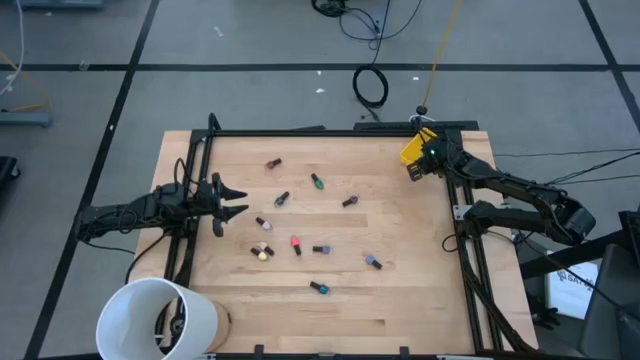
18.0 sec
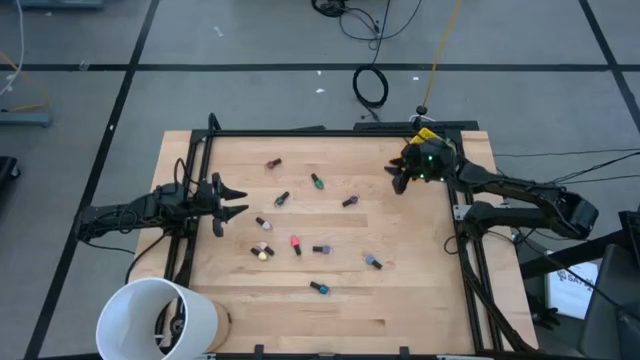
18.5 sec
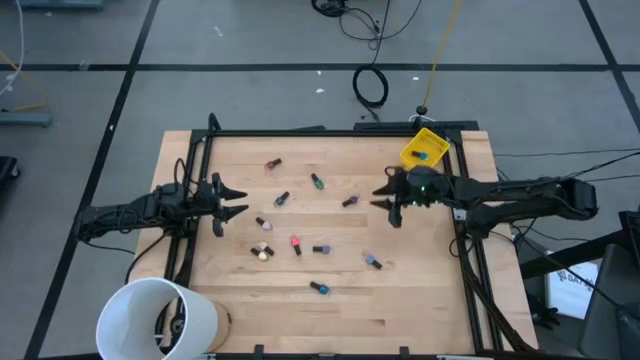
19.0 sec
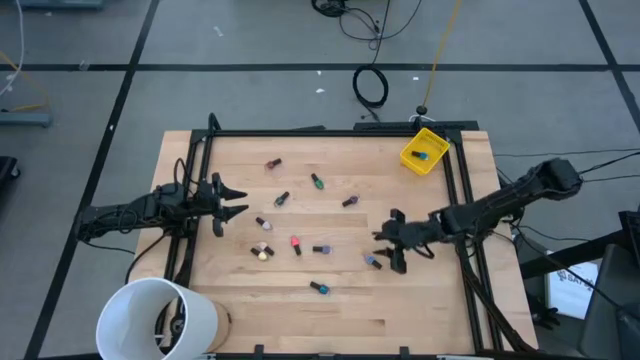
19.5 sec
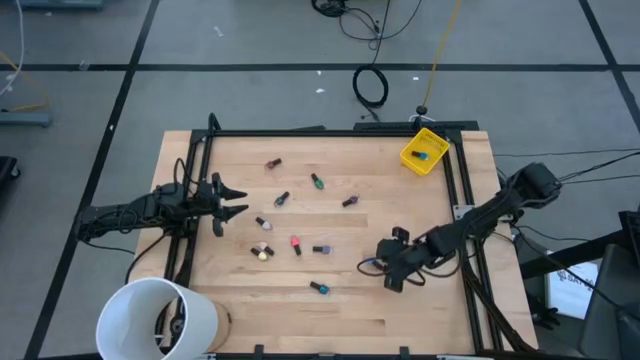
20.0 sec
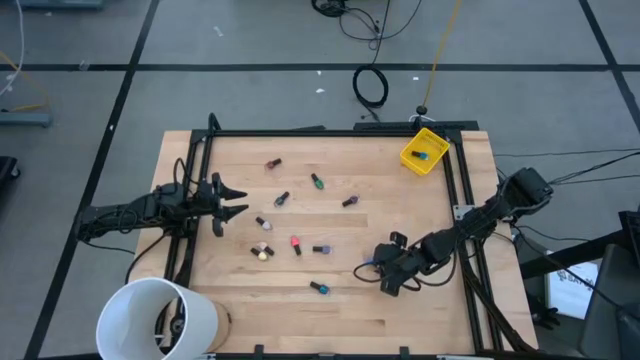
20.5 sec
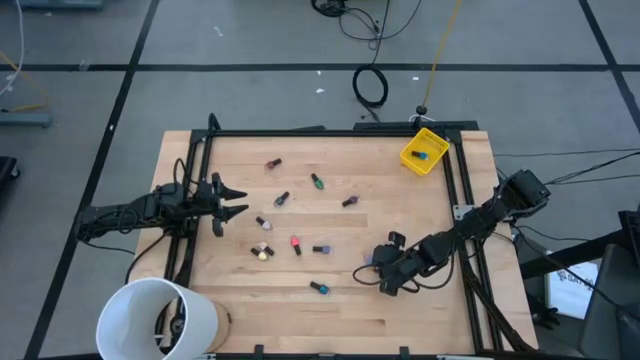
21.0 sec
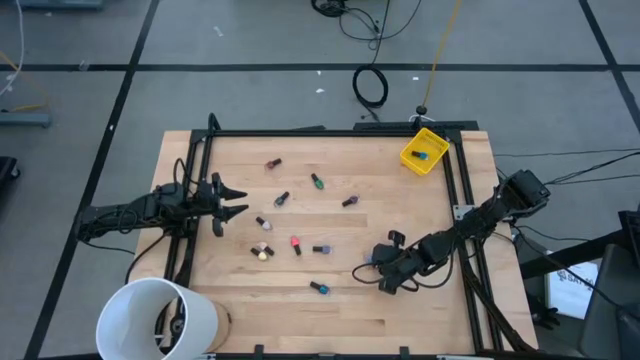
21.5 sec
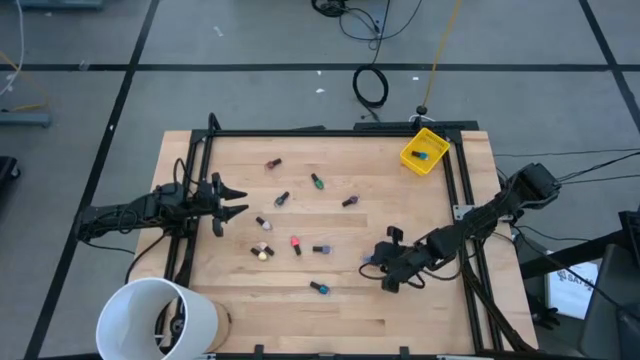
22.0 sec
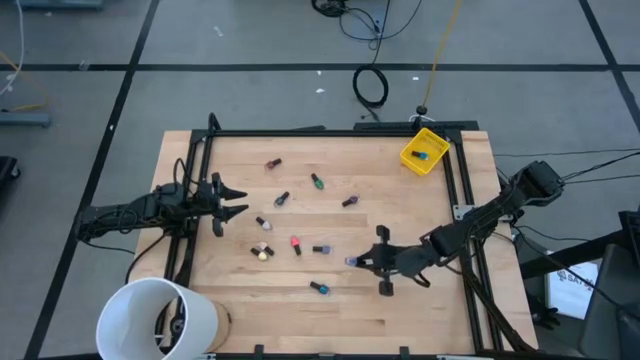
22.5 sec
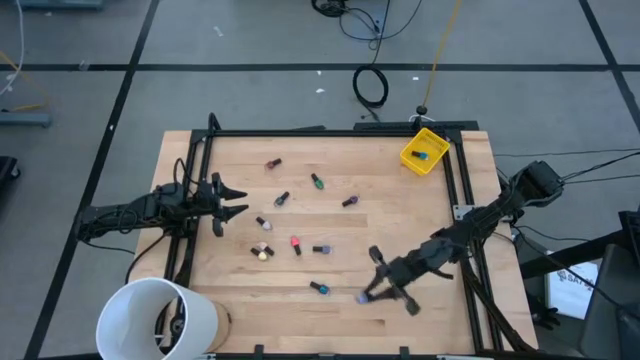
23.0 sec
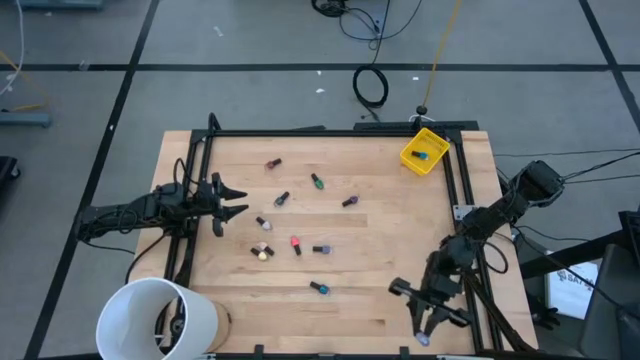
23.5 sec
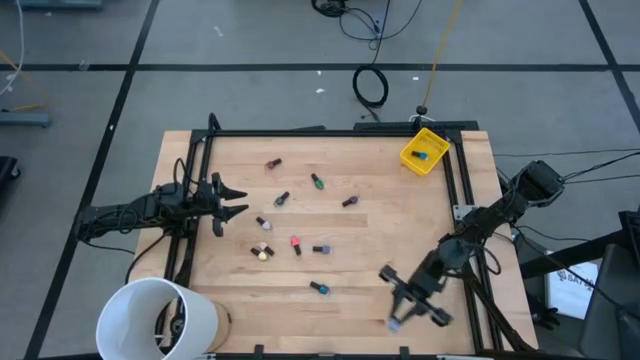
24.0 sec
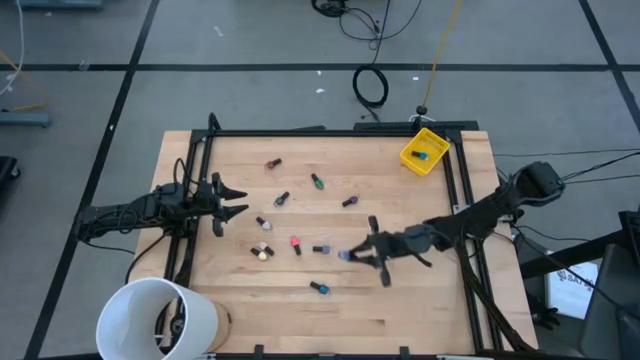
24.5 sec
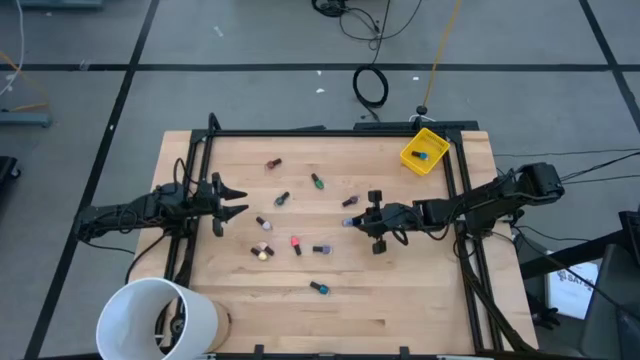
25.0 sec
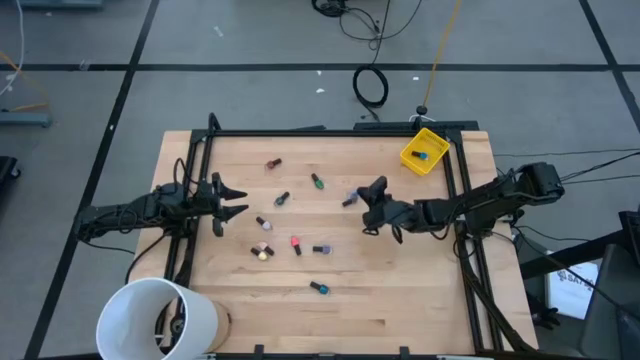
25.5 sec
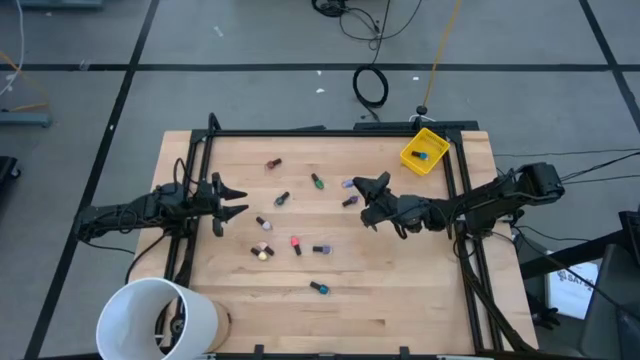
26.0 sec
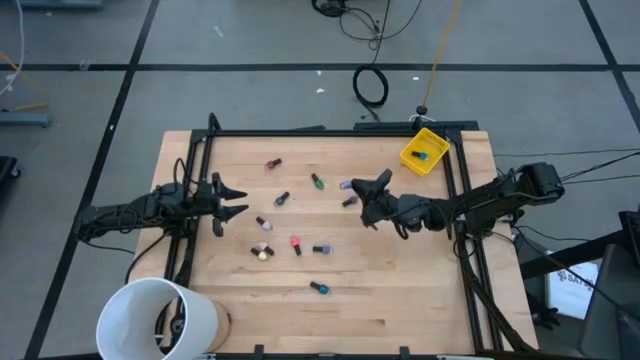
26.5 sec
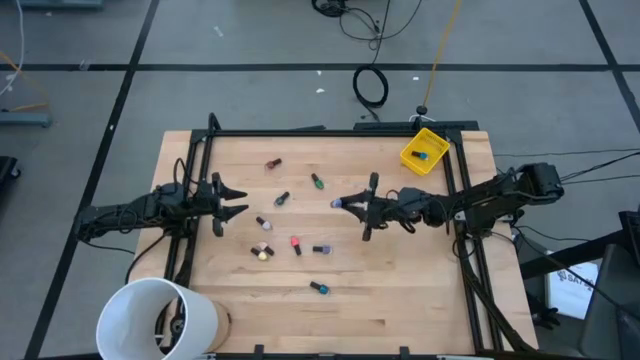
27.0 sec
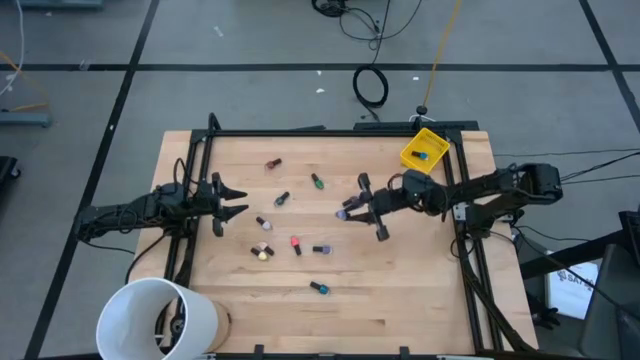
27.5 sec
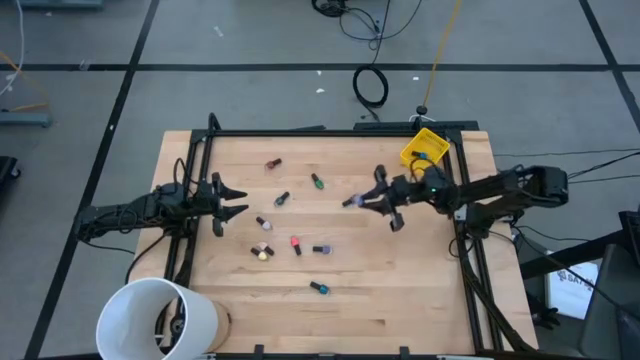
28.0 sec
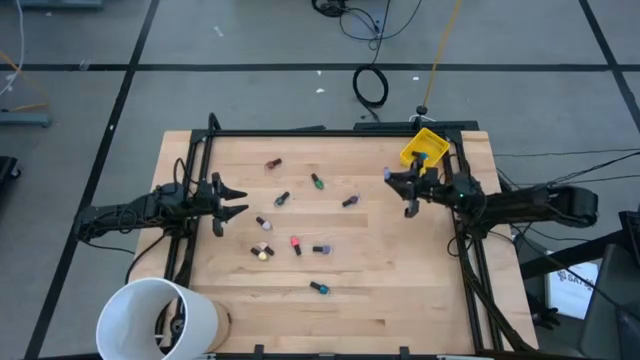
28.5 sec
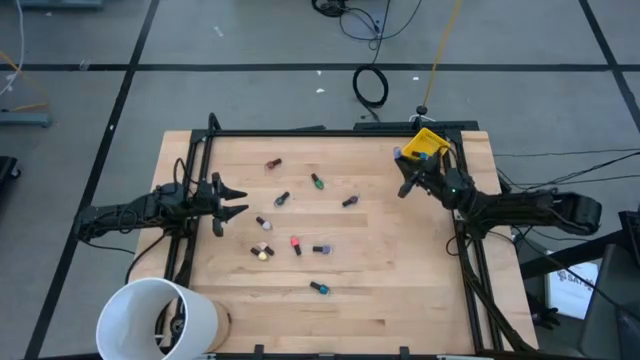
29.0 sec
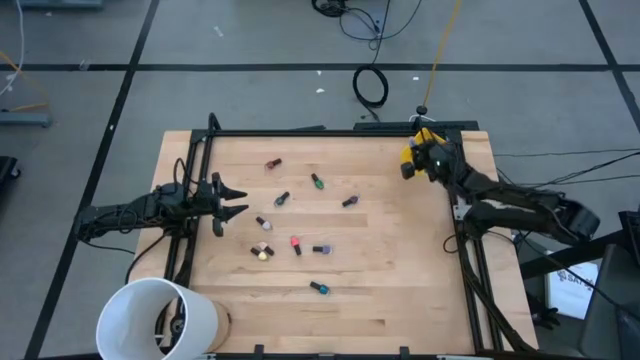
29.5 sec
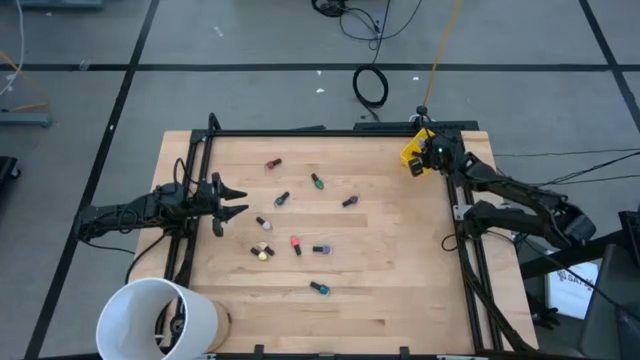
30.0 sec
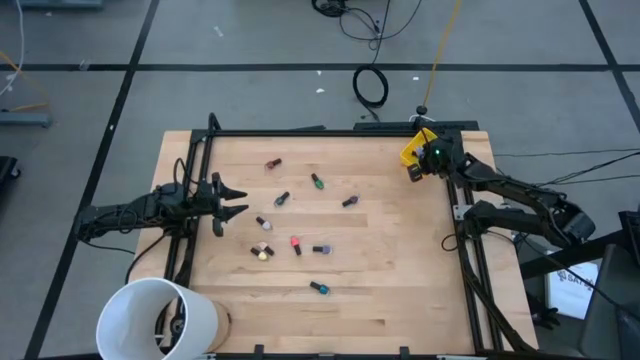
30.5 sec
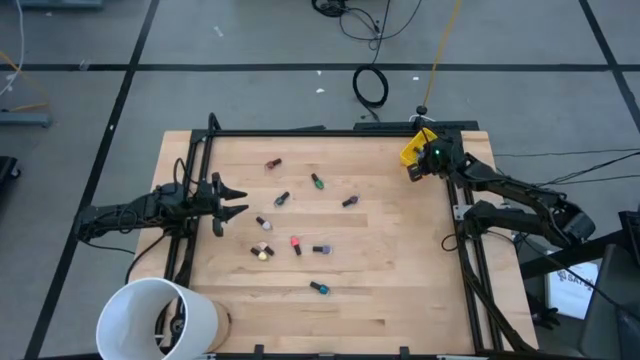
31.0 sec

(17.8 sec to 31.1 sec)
Task: Pick & Place Nail Polish
Put the right light blue nail polish bottle into the yellow bin

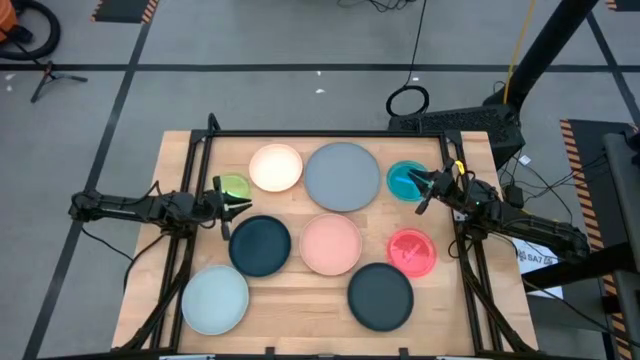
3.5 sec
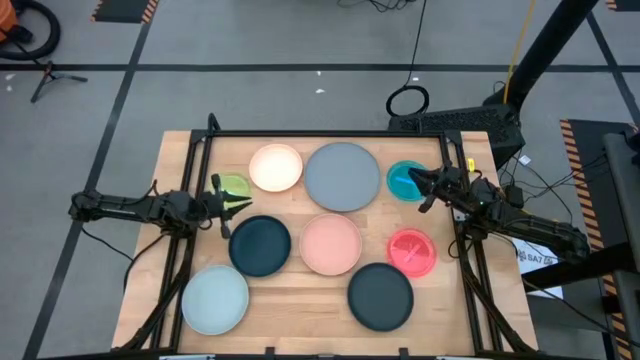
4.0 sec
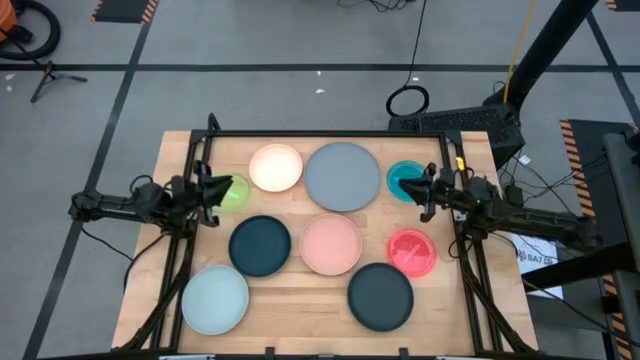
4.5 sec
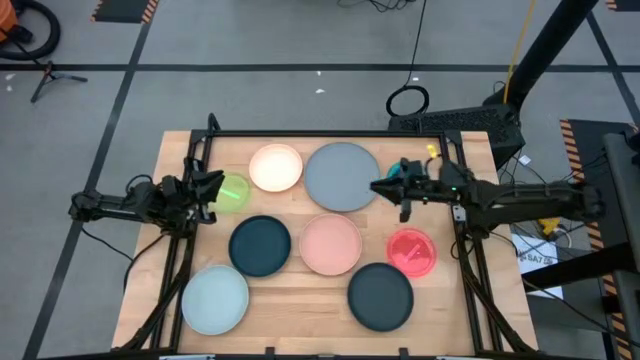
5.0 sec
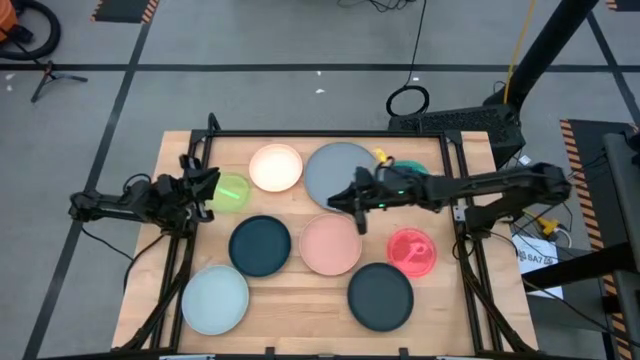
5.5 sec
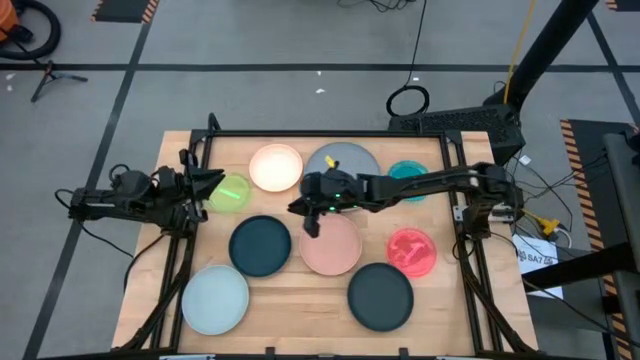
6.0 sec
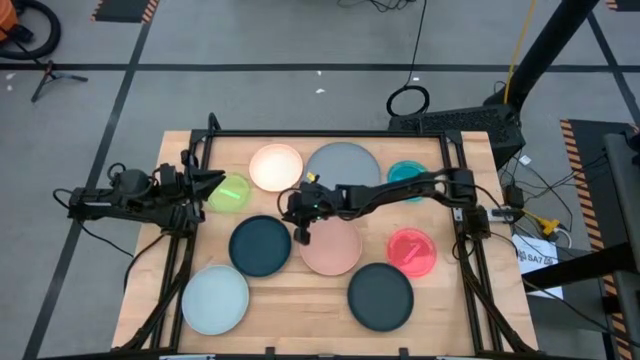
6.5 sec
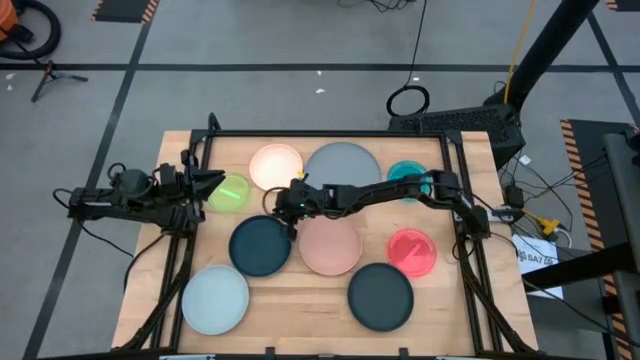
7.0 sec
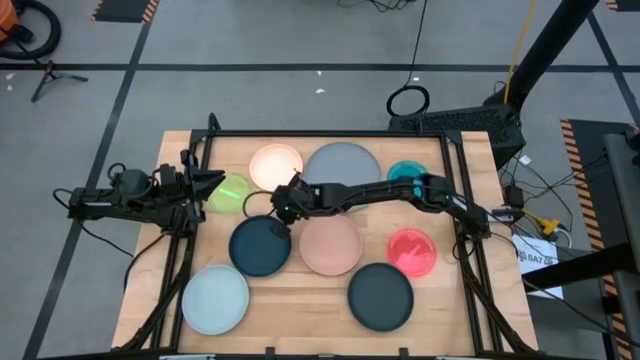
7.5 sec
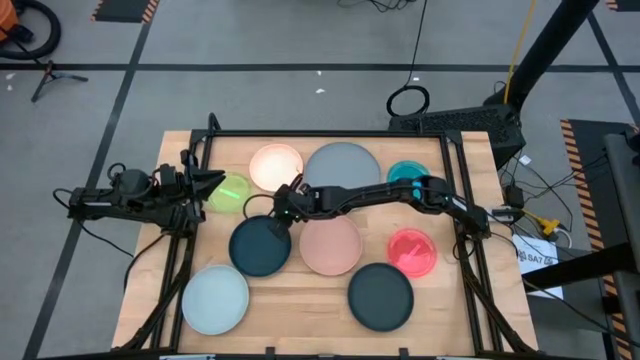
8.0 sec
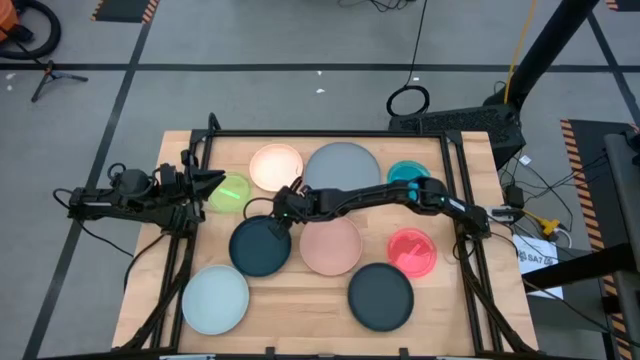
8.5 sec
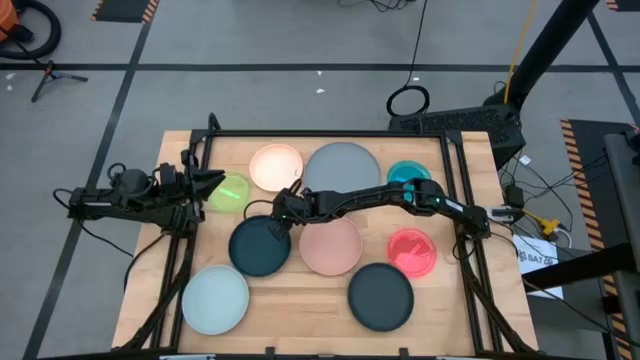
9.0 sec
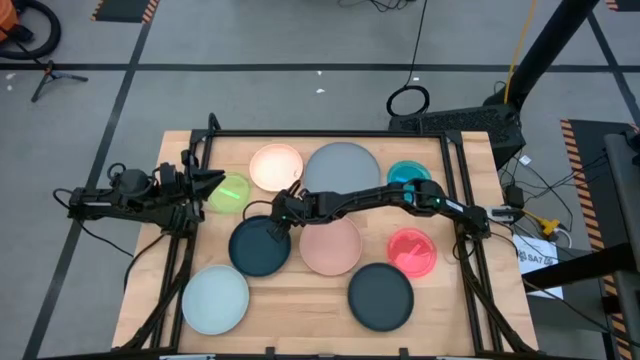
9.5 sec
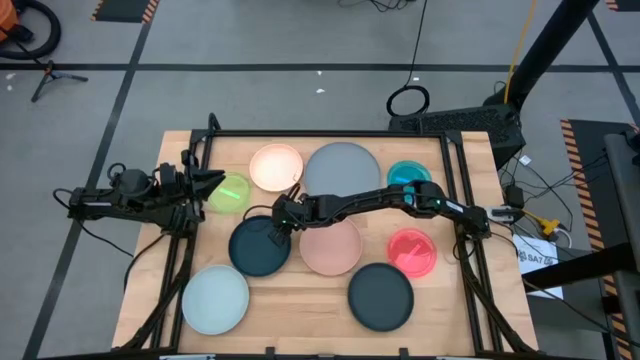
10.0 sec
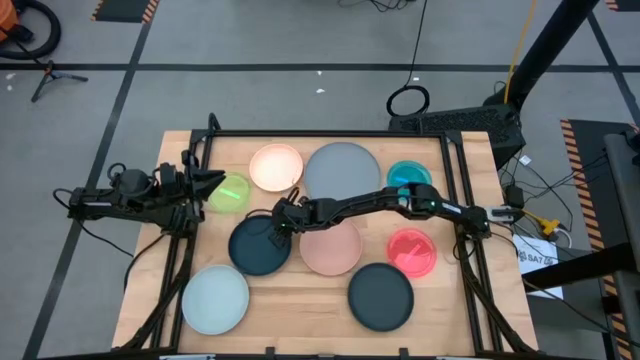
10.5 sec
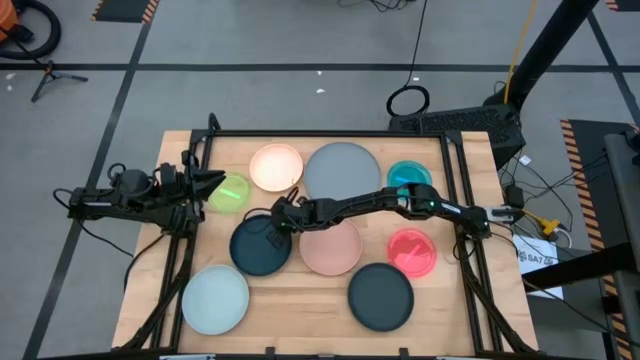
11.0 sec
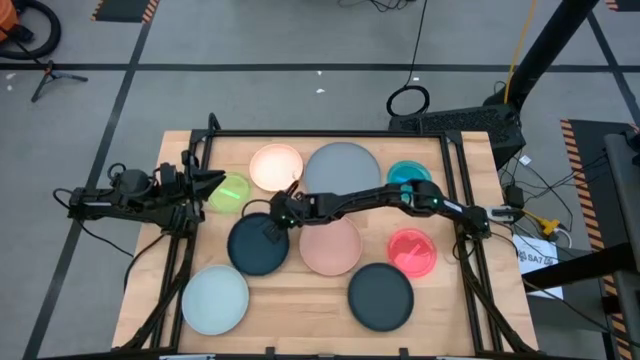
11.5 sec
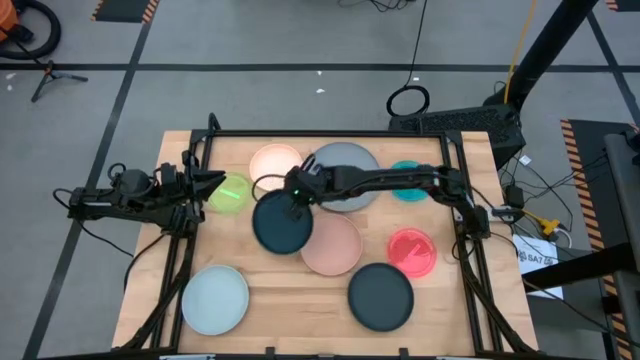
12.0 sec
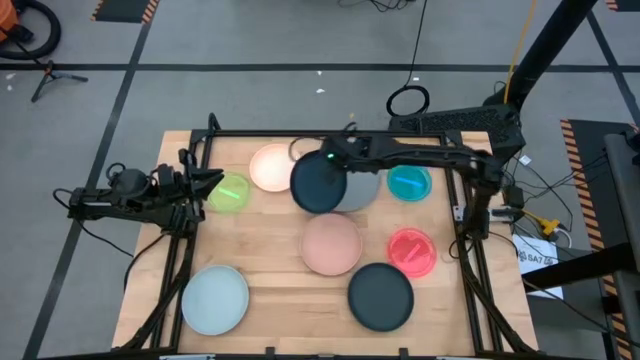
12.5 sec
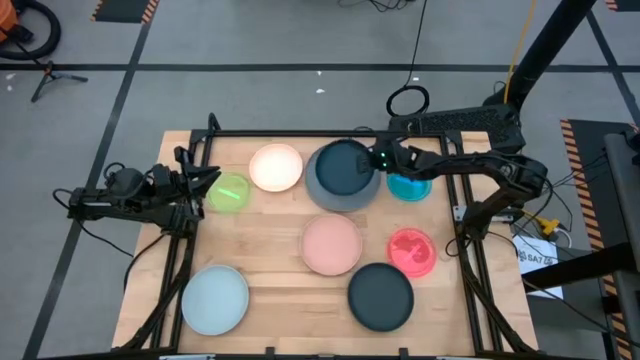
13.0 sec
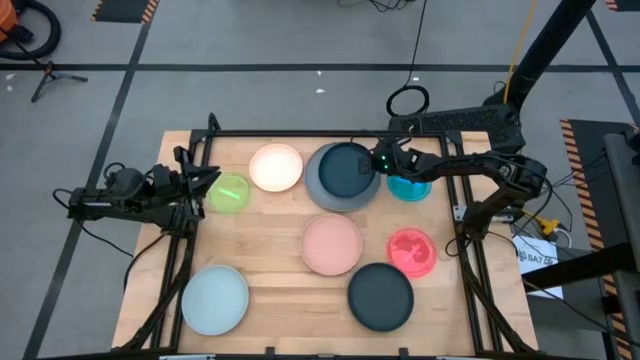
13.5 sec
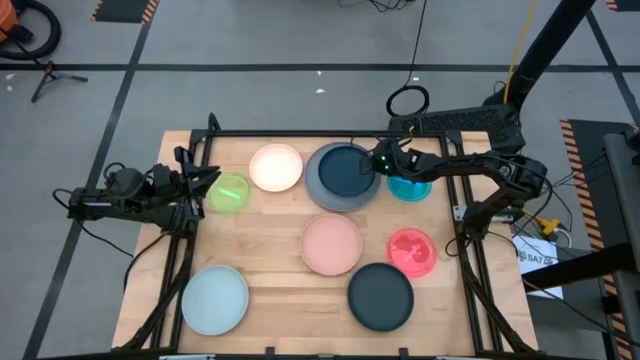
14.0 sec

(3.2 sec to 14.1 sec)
Task: Stack plastic plates
Stack the dark blue plate on top of the gray plate
